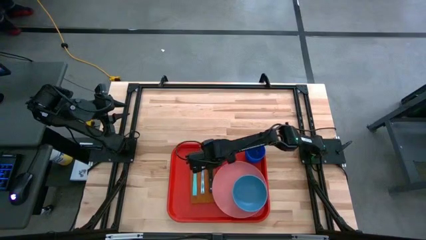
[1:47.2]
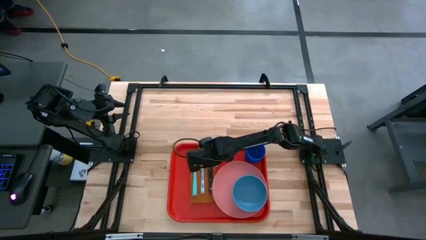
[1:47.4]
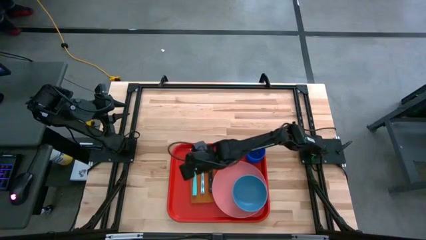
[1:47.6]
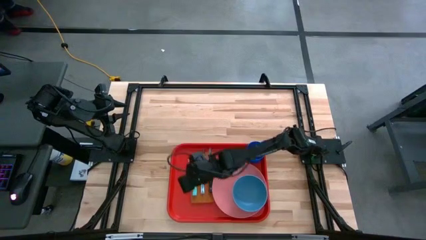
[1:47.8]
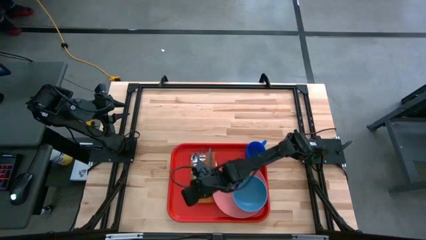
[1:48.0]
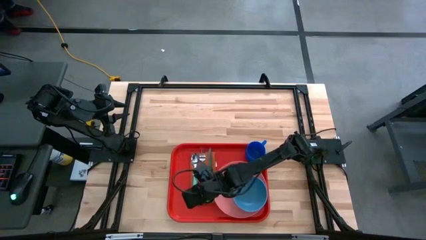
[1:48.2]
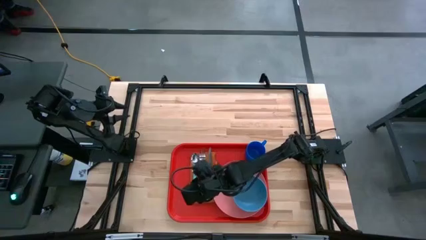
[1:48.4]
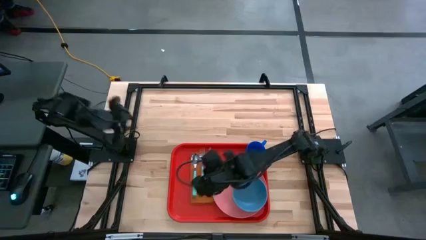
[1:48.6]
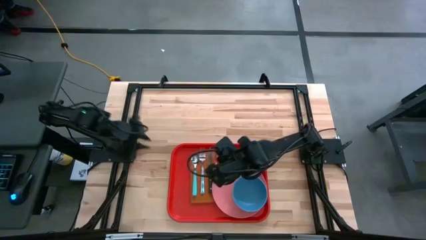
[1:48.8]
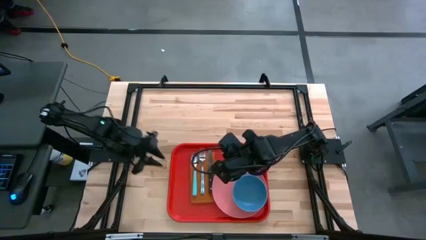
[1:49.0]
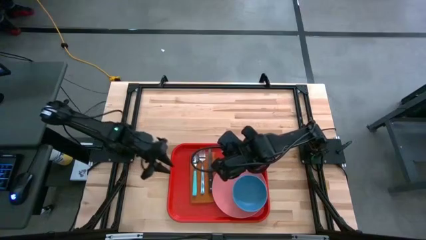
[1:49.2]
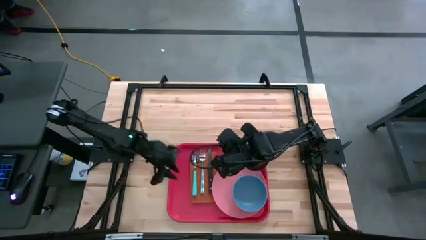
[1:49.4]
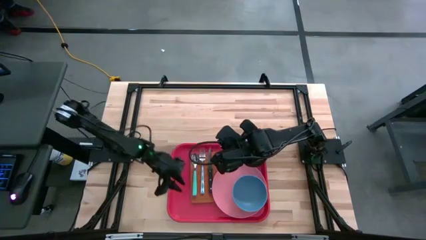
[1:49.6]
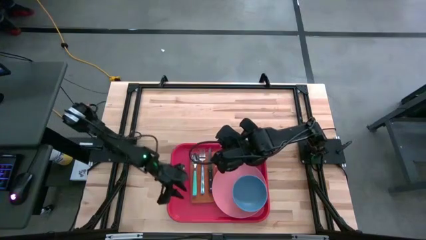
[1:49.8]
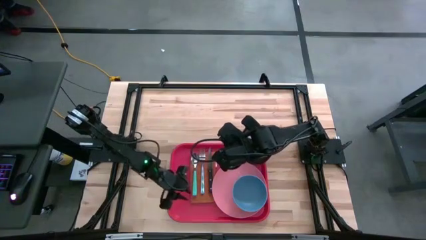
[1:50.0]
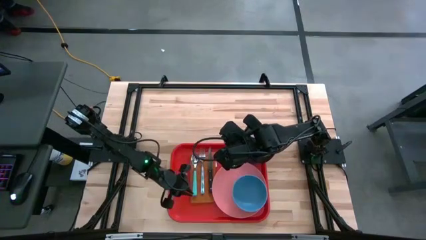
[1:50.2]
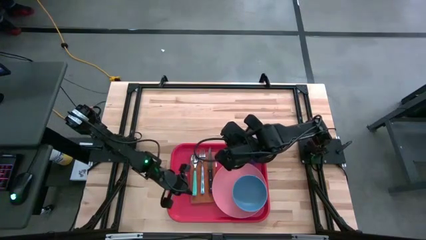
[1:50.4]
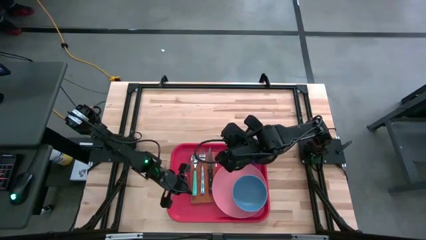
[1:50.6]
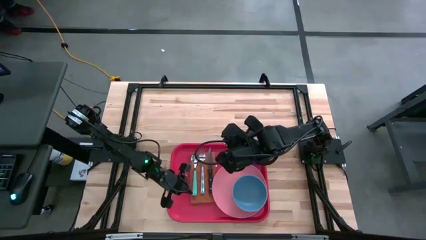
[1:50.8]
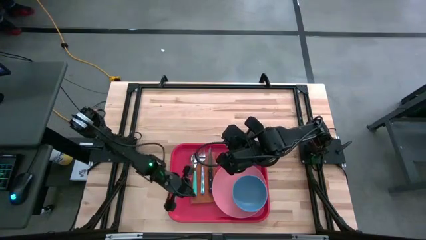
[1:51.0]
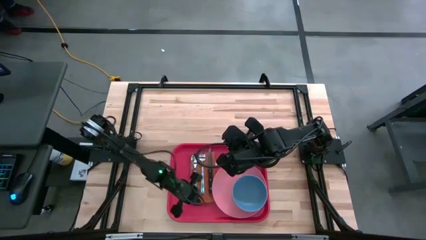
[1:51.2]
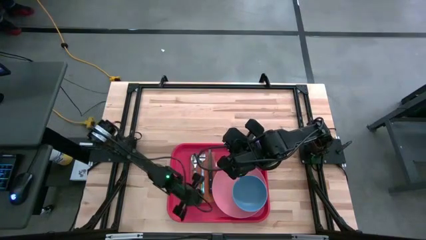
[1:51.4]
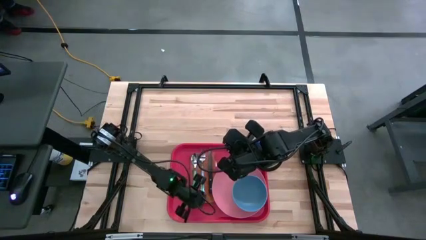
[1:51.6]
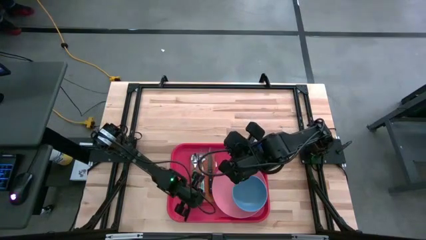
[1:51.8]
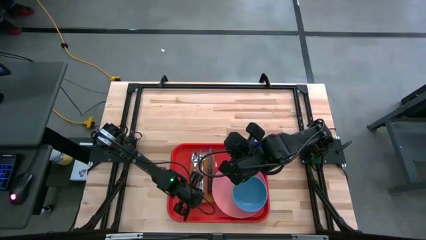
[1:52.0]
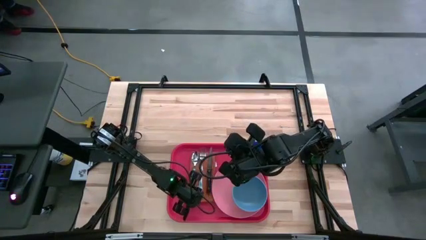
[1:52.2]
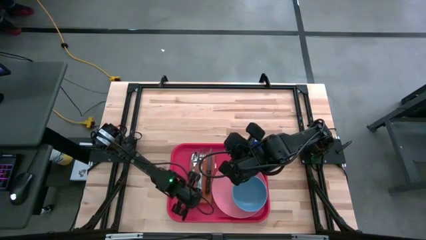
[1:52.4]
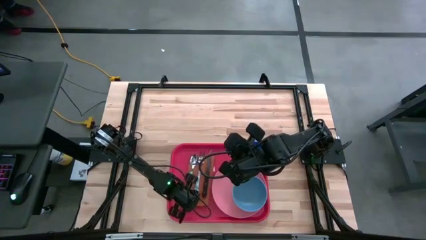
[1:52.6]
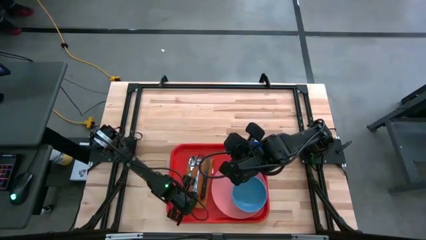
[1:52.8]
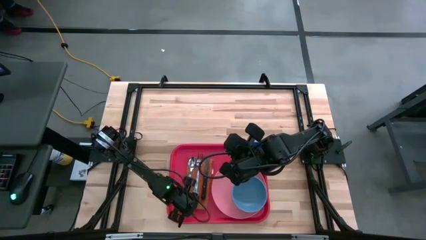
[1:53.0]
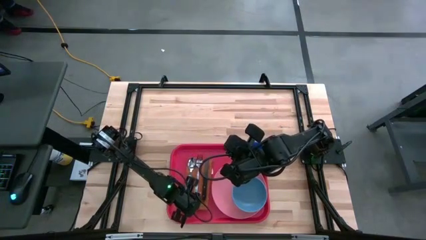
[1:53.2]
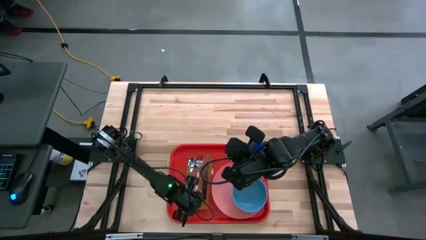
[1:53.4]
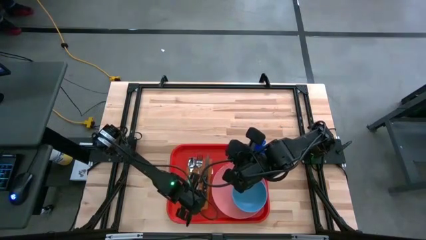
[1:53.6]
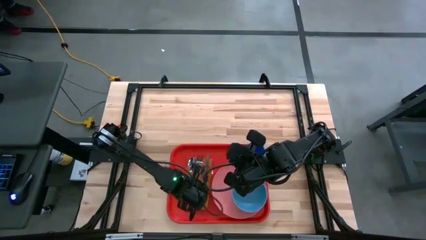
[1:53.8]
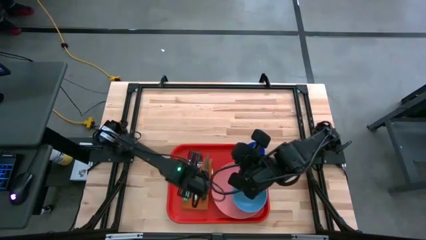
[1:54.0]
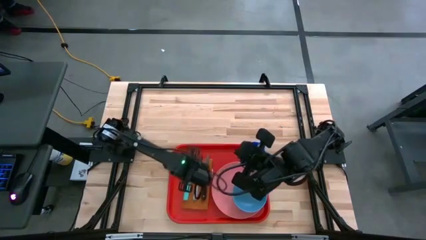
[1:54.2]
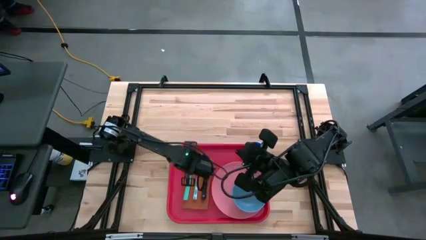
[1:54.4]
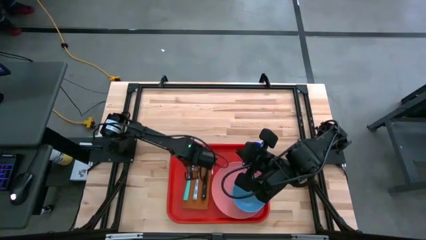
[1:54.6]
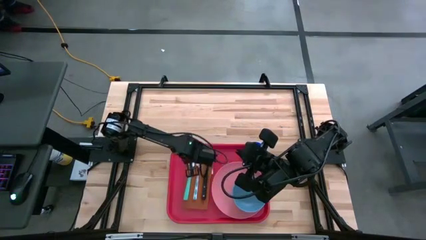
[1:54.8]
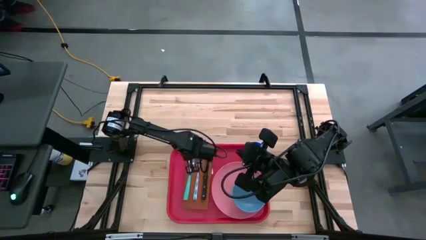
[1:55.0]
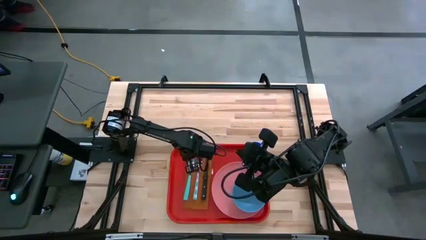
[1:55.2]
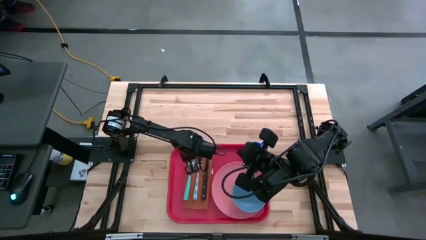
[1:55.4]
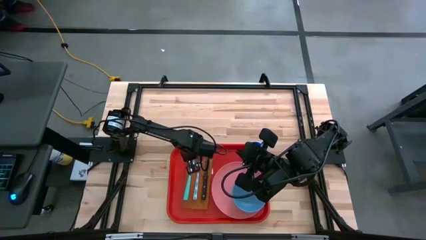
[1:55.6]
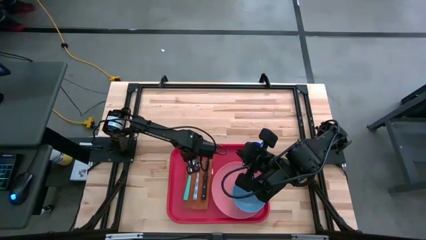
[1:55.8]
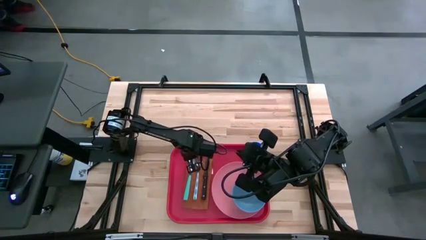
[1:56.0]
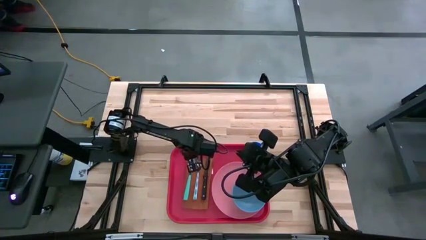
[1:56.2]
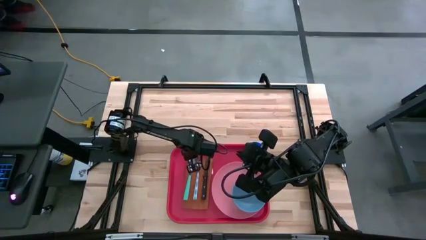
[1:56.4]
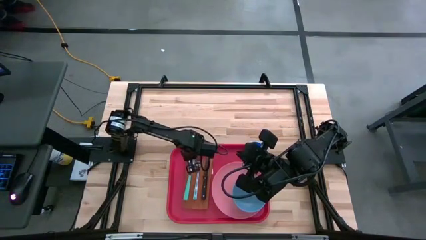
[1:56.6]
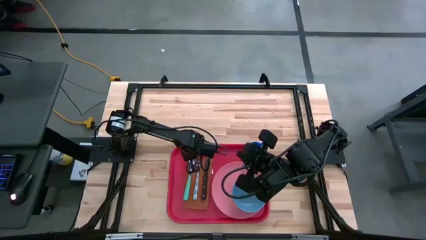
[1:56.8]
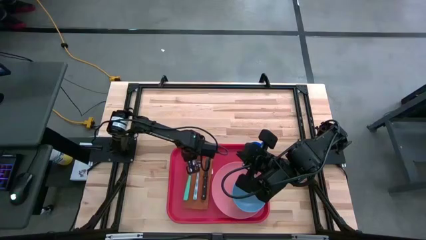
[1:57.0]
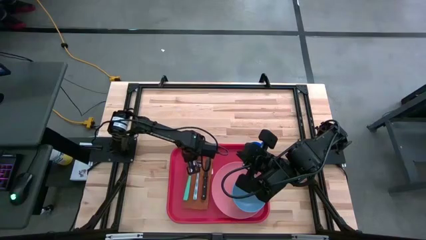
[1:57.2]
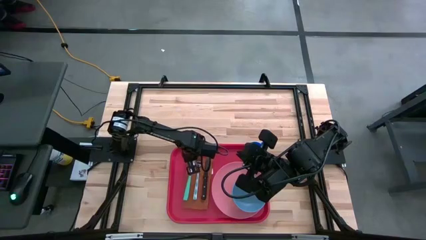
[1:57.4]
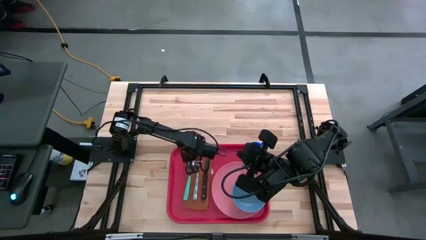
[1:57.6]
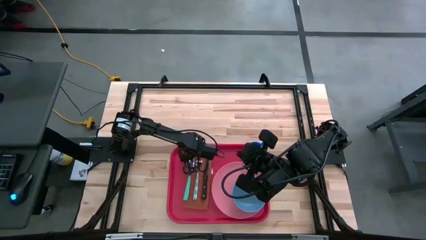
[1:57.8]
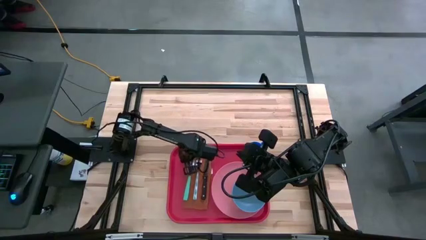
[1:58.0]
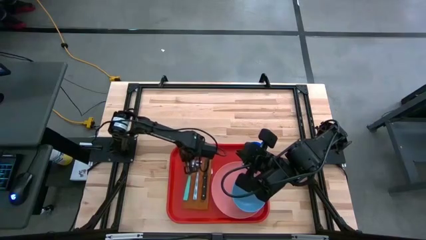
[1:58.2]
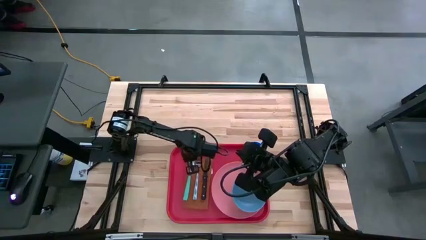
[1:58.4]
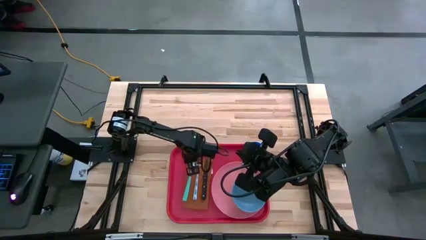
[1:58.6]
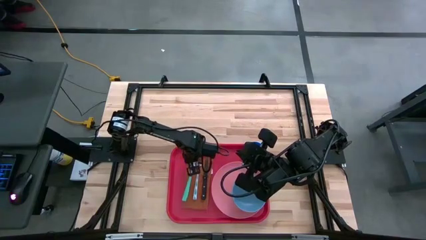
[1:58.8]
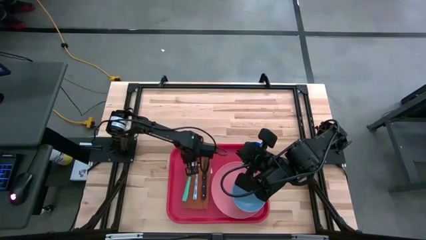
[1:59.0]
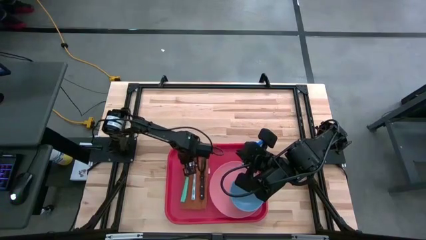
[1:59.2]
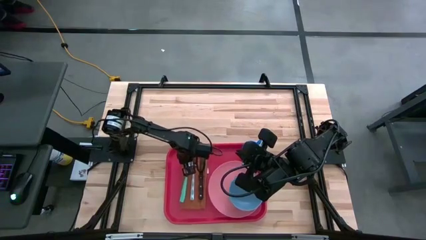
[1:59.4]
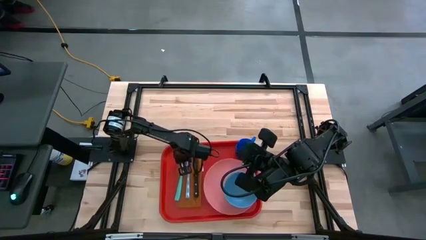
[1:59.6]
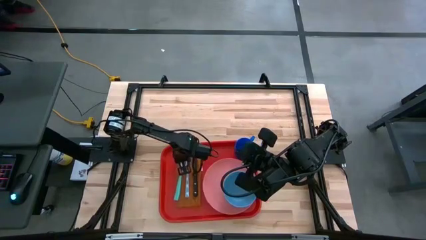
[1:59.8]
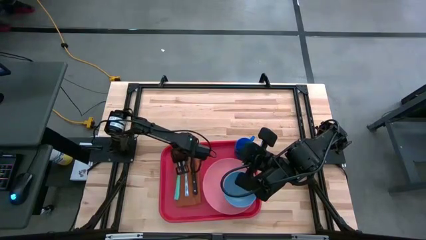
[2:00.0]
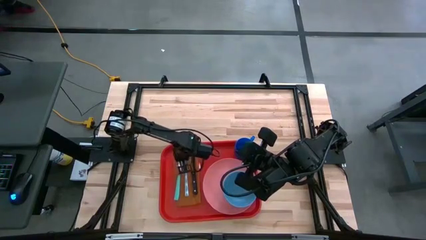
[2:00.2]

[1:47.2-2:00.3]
Task: Set up tray
Adjust the orange napkin

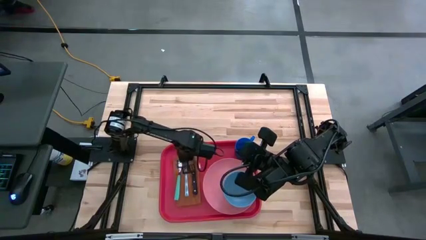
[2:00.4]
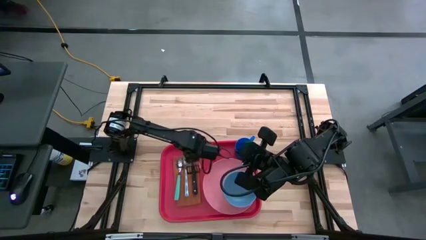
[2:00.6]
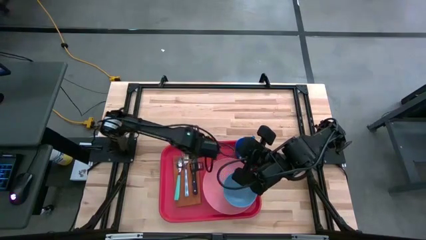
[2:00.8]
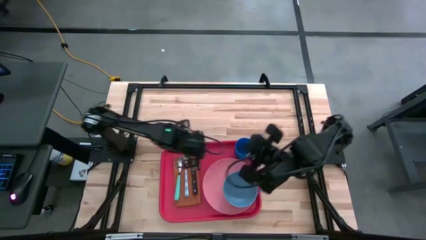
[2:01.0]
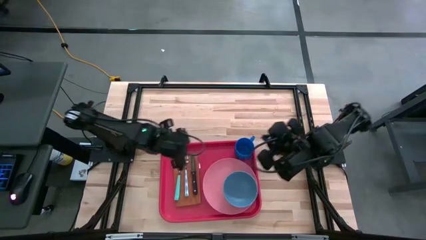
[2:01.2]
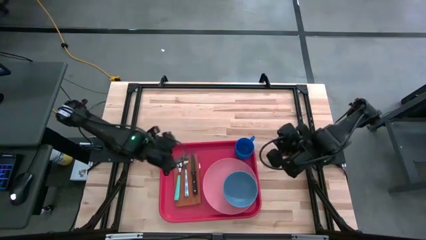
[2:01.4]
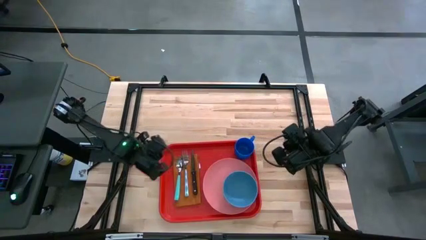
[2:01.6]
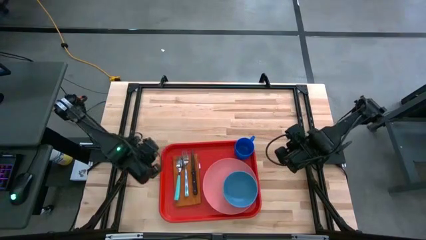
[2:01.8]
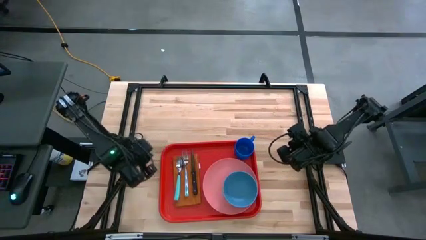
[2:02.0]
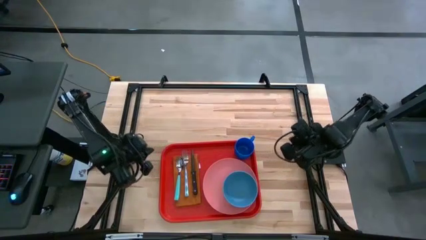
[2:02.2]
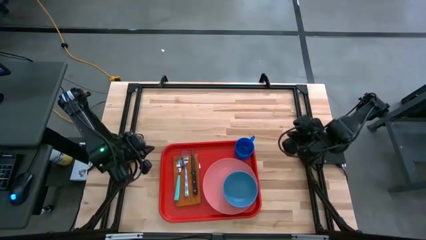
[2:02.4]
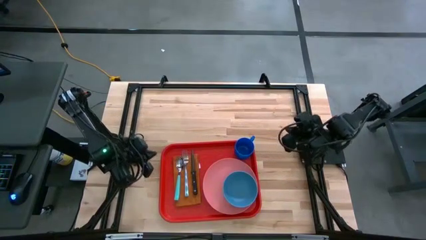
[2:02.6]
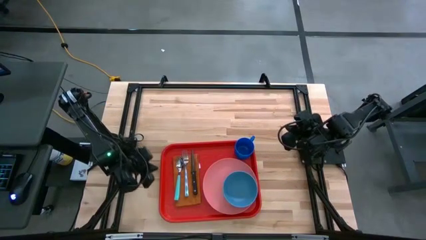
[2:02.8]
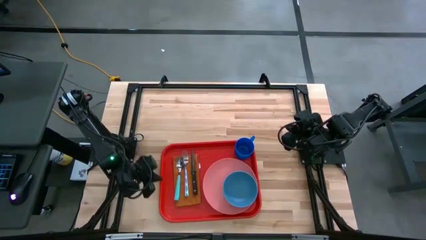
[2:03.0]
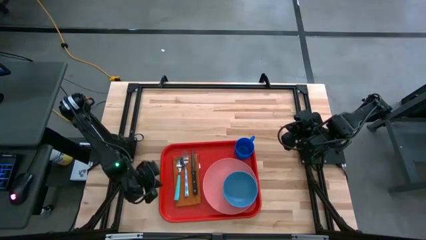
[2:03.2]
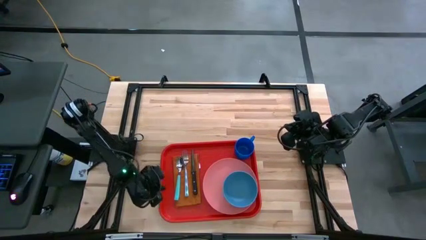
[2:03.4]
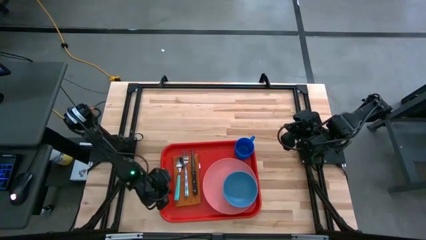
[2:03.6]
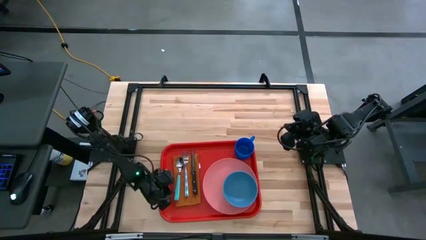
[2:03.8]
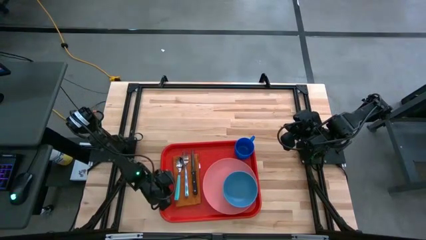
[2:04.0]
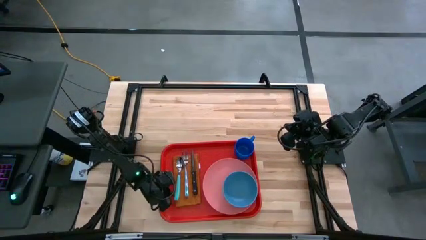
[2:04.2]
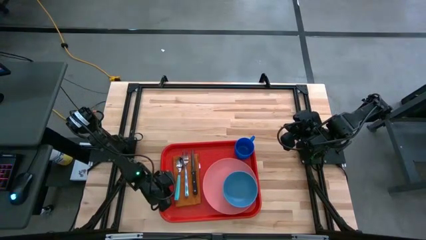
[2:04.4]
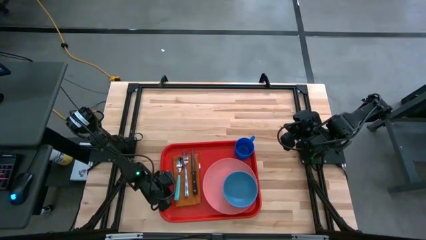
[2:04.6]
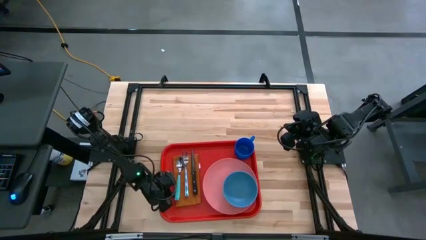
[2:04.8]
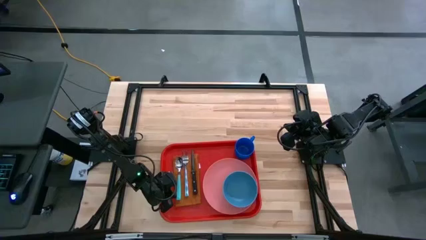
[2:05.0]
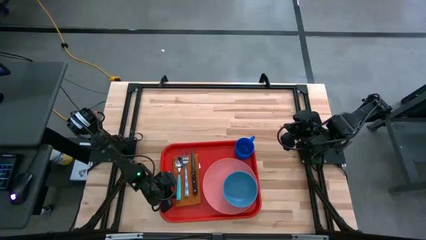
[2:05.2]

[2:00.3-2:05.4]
Adjust the blue spoon
